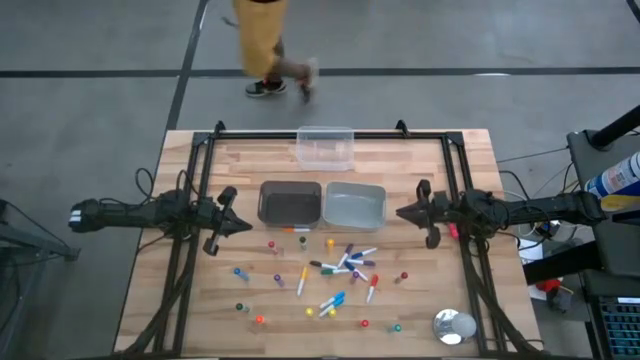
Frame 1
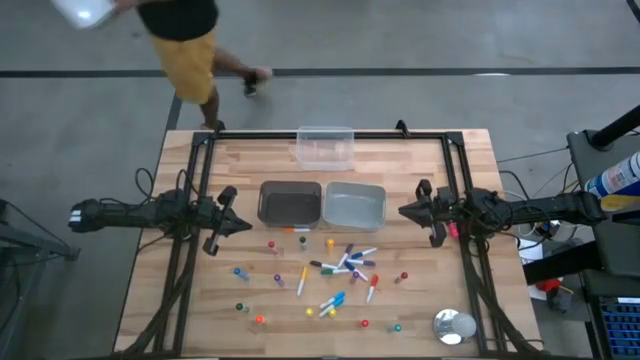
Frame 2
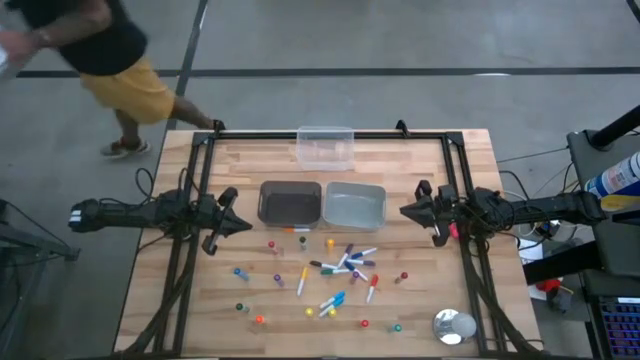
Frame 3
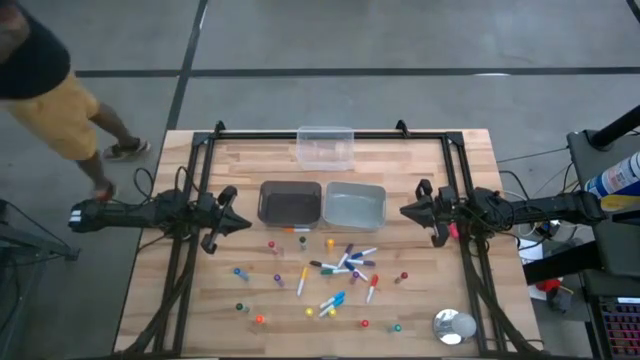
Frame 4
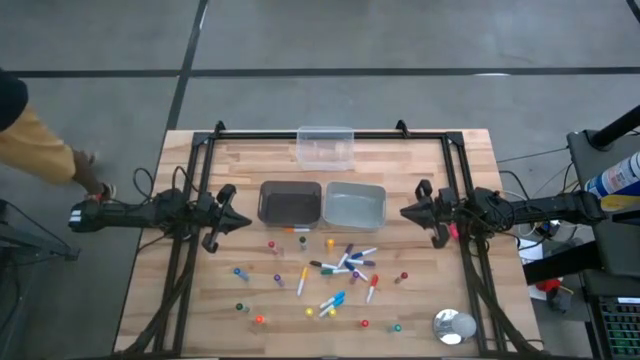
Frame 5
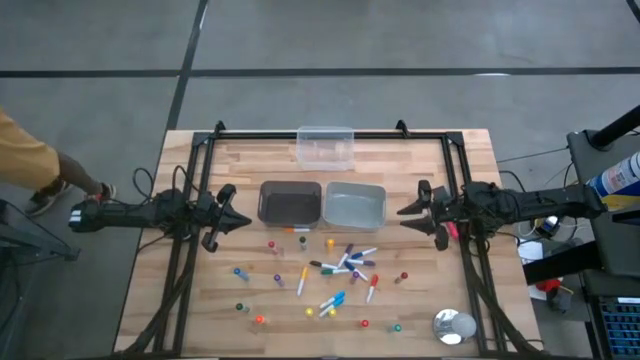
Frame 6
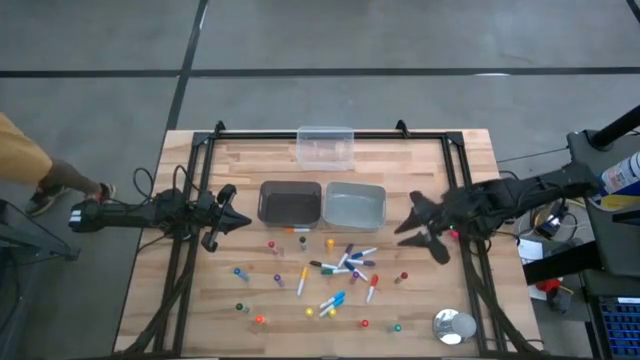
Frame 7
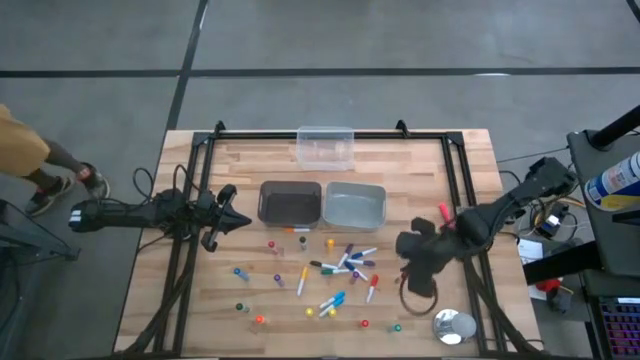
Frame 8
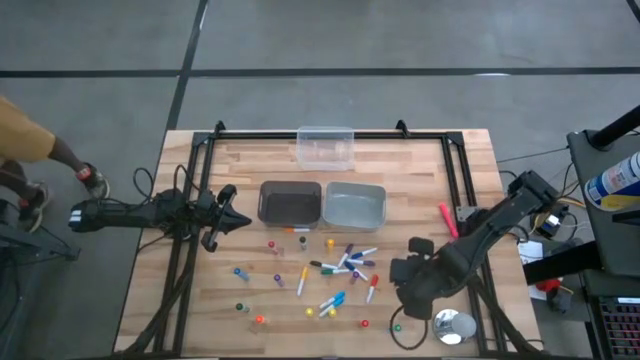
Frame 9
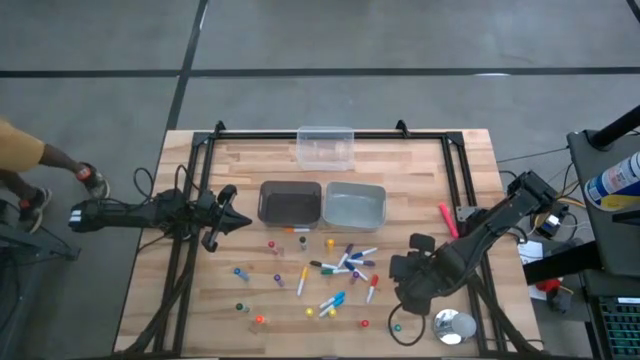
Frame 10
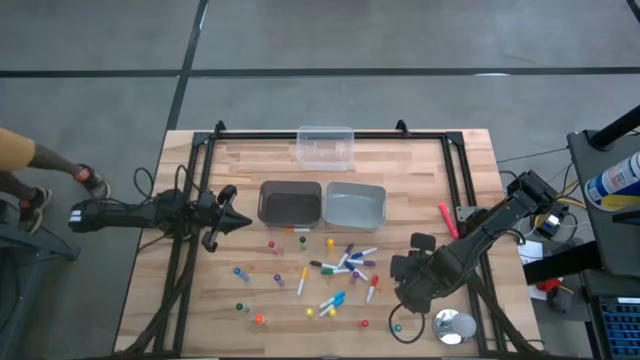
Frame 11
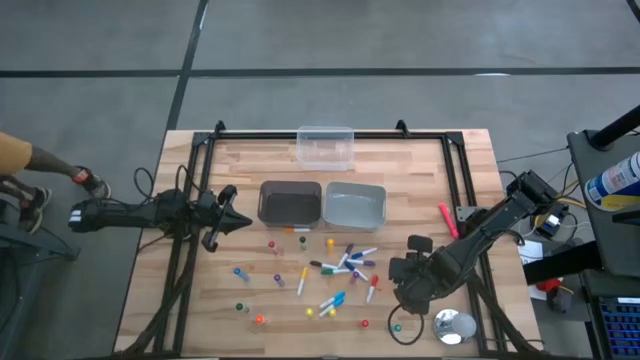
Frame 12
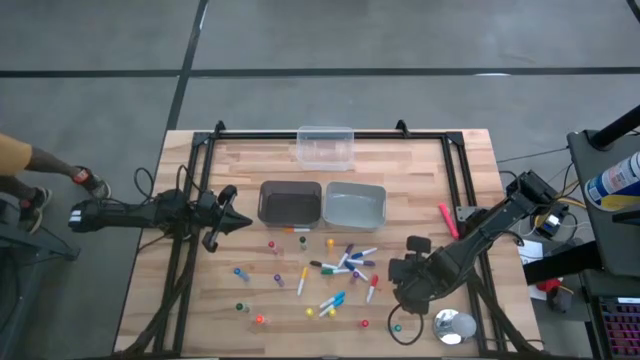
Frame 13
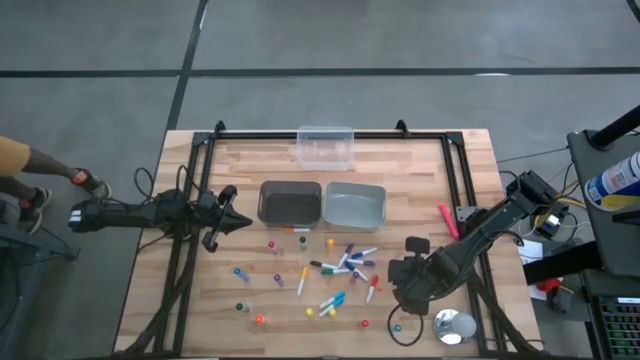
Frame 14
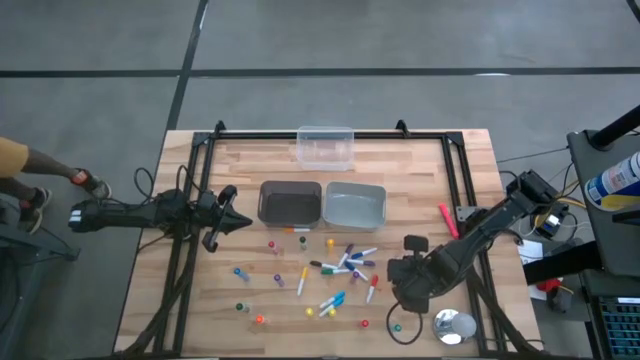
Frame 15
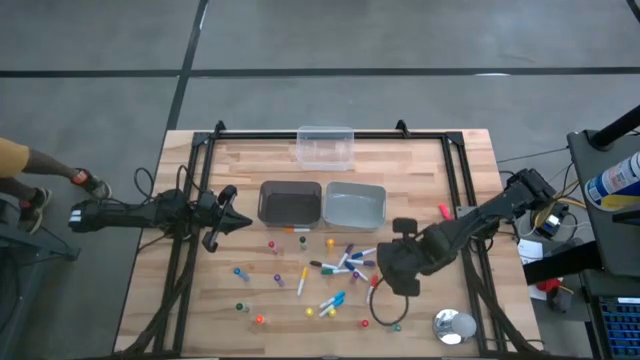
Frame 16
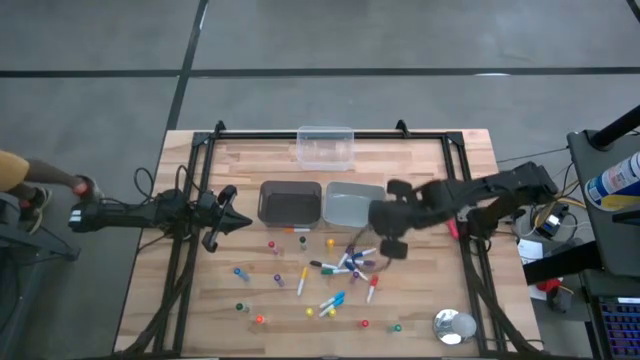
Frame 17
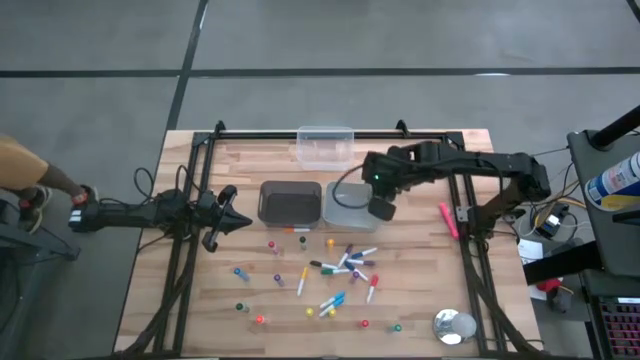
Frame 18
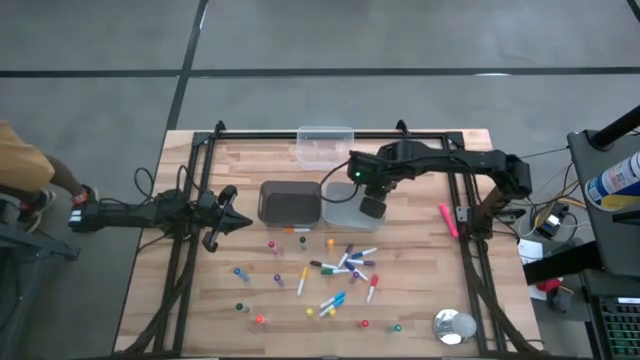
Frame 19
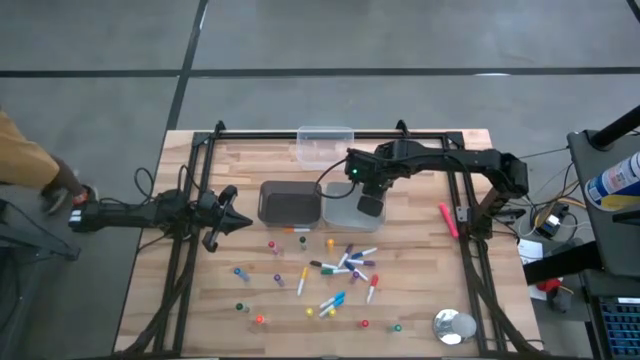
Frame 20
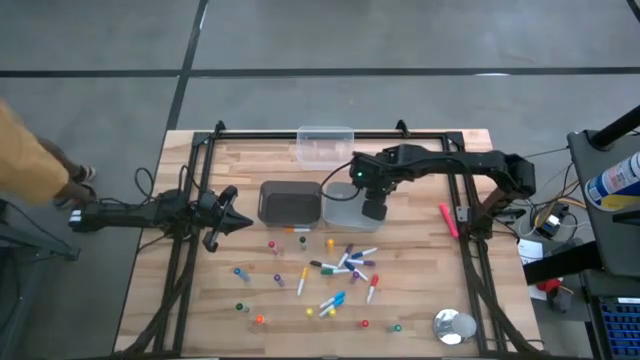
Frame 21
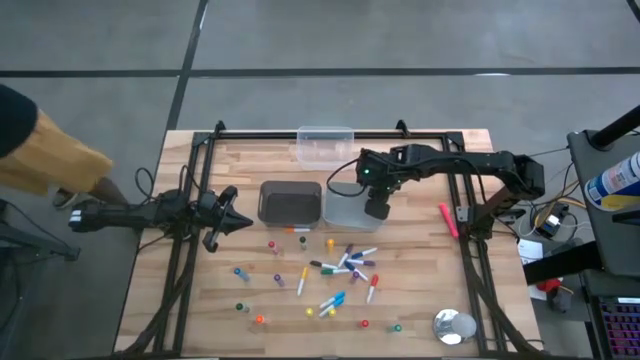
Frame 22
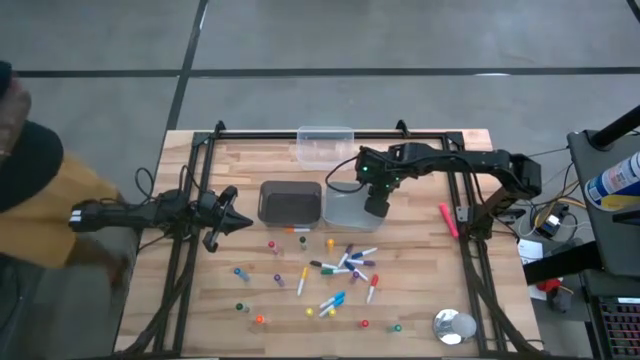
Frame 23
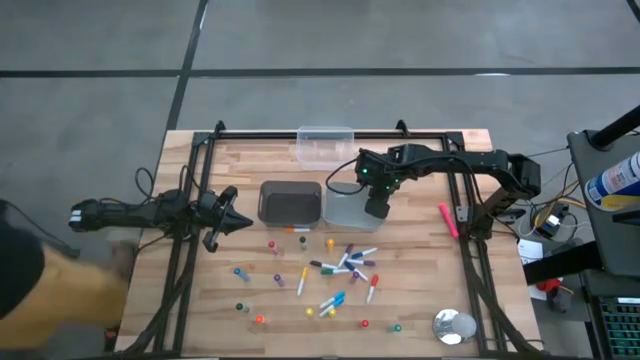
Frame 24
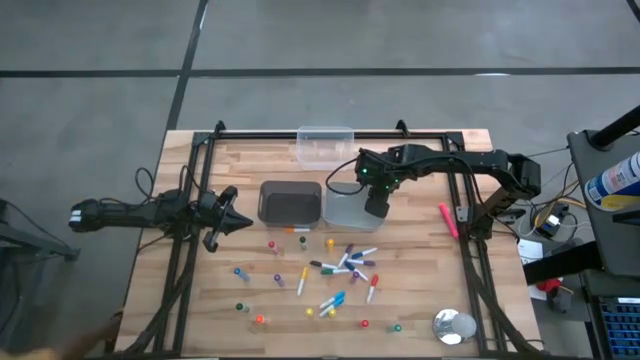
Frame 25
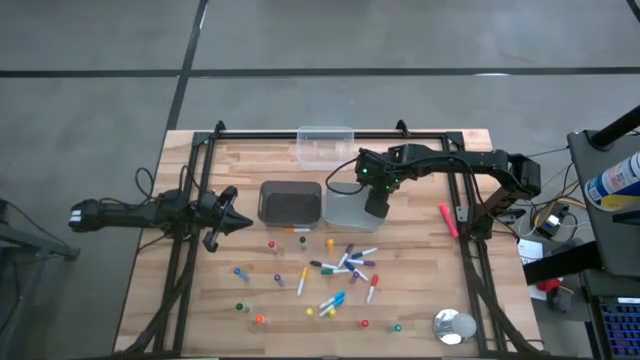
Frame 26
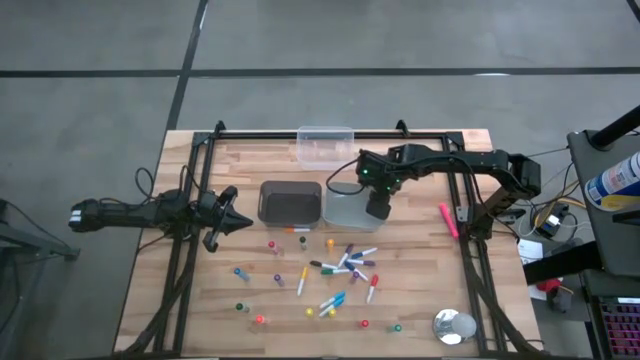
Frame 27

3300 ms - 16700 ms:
Task: Pick & Place Markers
Put the large red marker pen into the white bin
